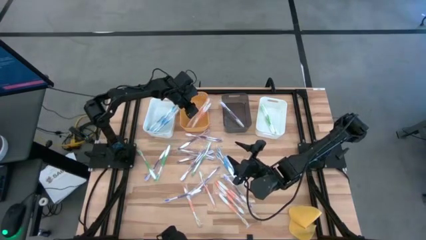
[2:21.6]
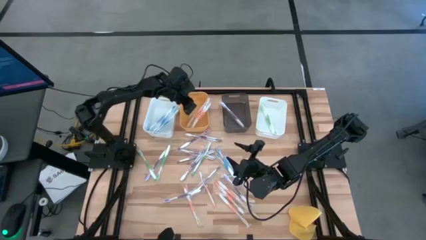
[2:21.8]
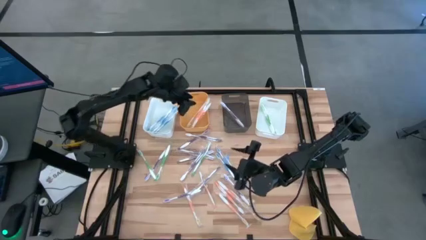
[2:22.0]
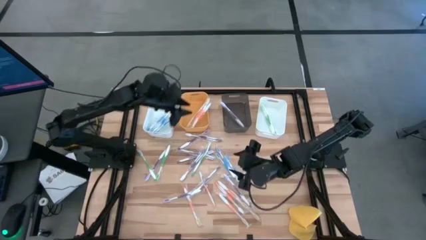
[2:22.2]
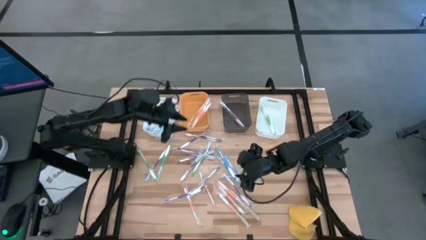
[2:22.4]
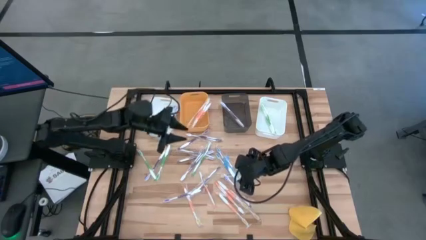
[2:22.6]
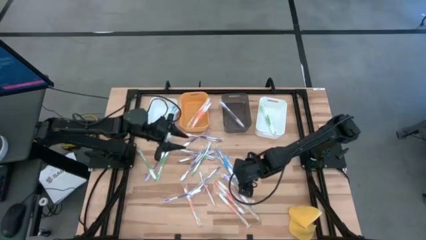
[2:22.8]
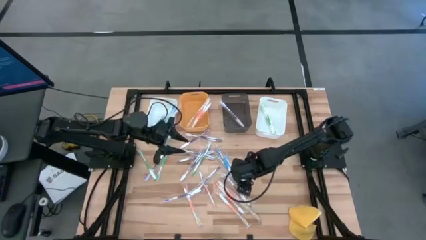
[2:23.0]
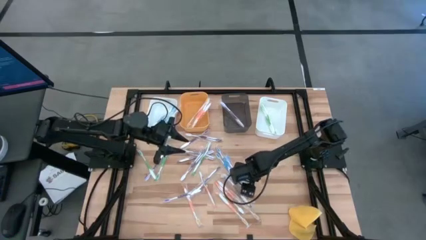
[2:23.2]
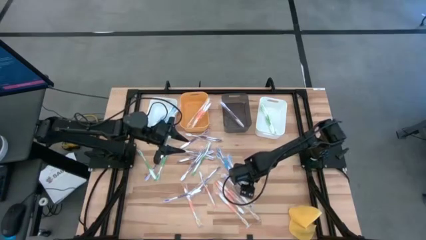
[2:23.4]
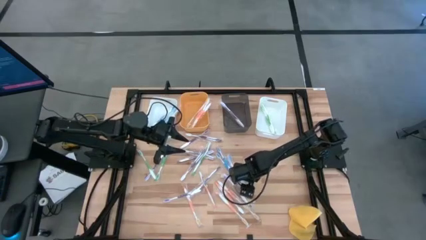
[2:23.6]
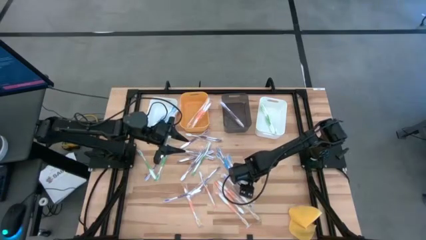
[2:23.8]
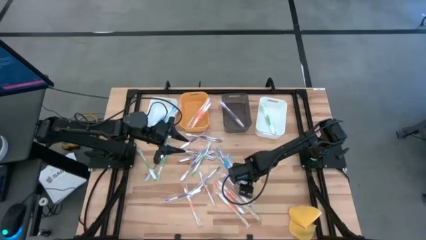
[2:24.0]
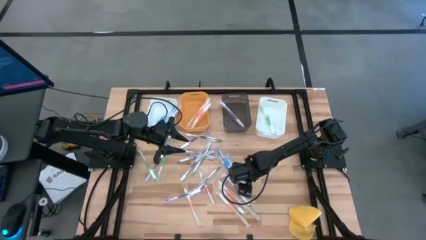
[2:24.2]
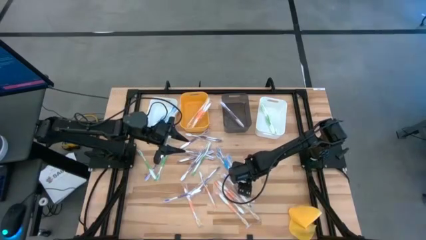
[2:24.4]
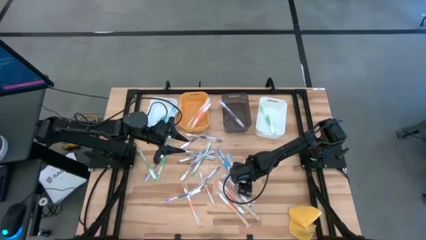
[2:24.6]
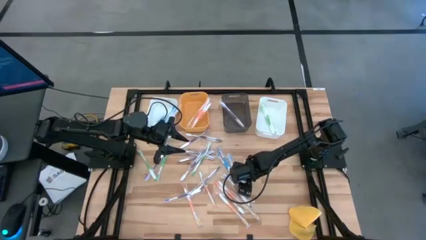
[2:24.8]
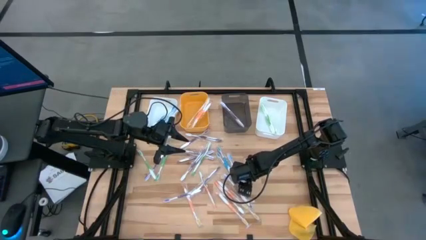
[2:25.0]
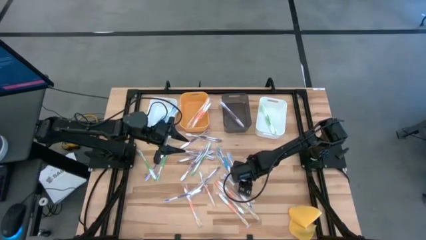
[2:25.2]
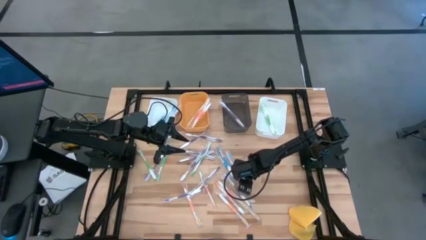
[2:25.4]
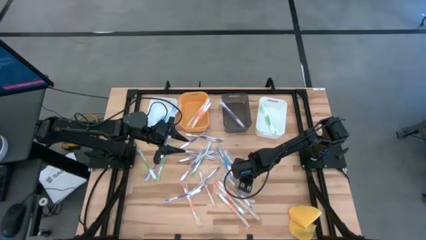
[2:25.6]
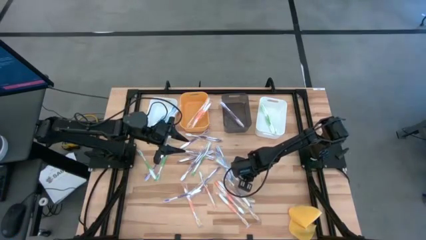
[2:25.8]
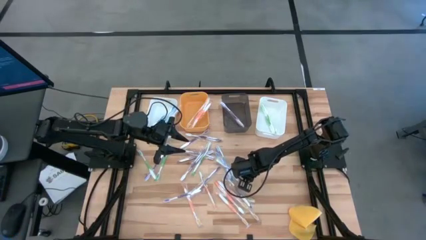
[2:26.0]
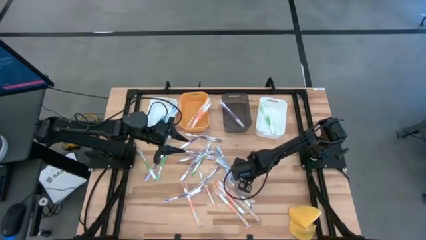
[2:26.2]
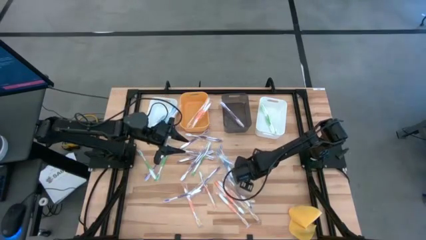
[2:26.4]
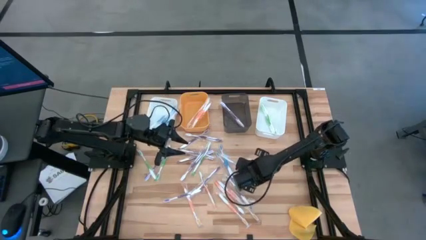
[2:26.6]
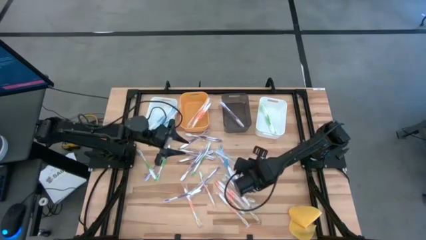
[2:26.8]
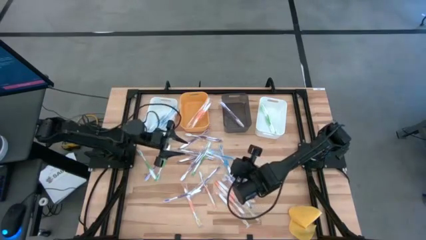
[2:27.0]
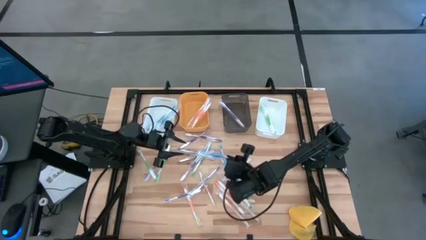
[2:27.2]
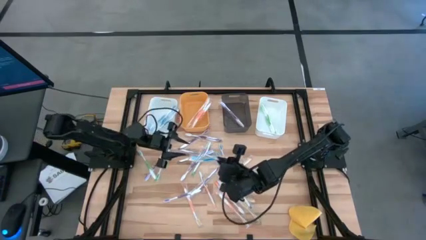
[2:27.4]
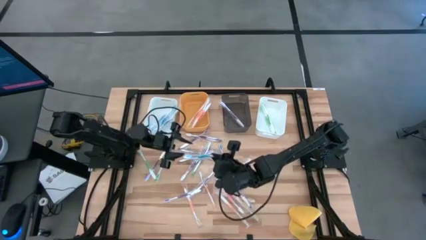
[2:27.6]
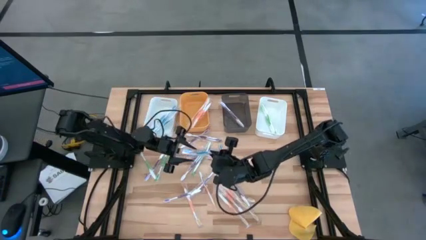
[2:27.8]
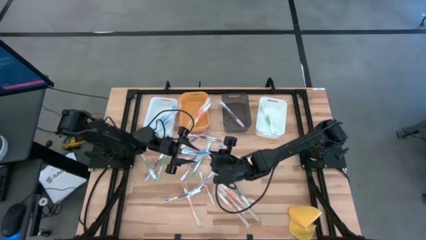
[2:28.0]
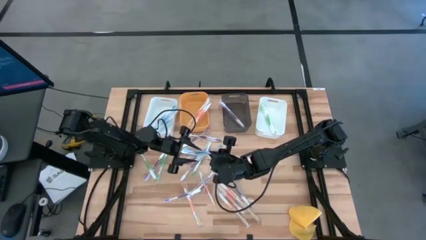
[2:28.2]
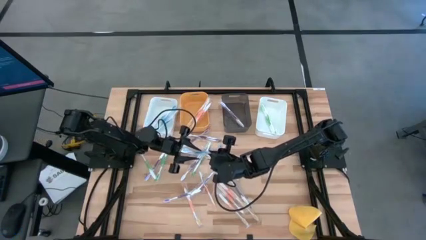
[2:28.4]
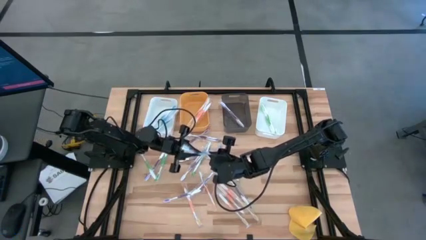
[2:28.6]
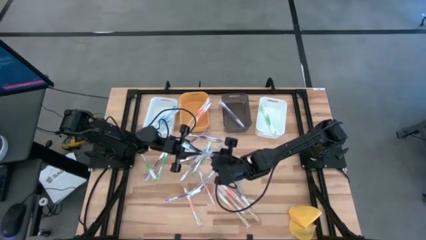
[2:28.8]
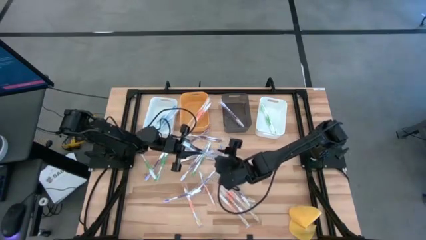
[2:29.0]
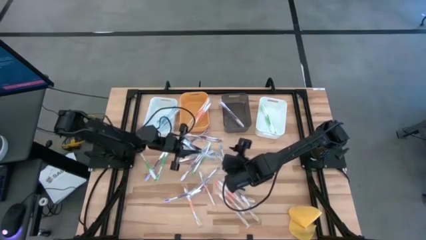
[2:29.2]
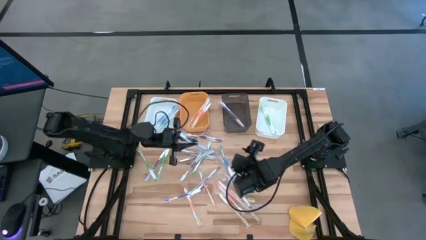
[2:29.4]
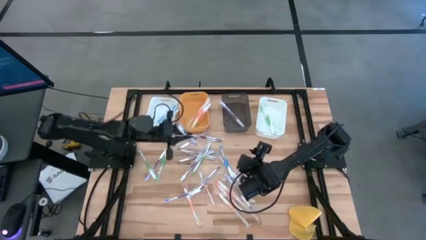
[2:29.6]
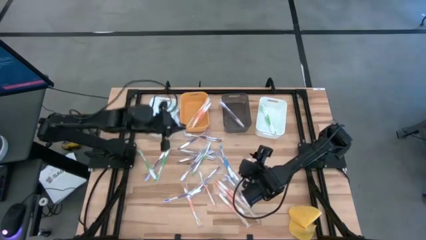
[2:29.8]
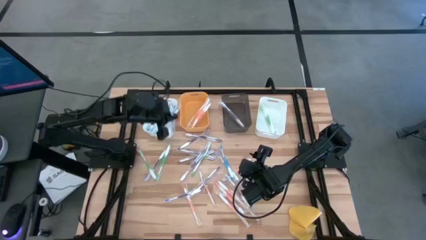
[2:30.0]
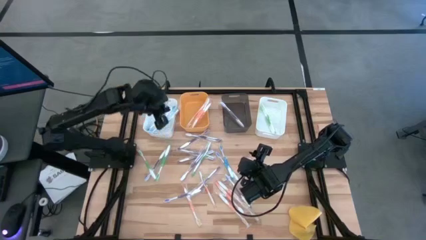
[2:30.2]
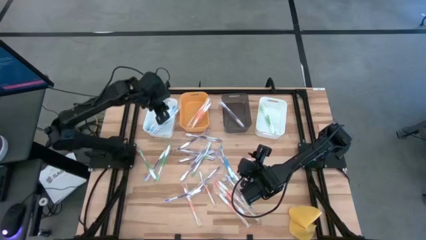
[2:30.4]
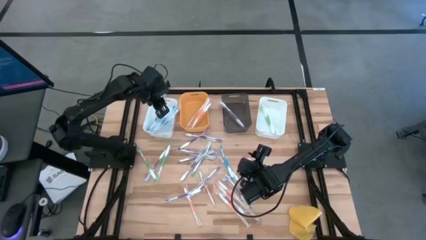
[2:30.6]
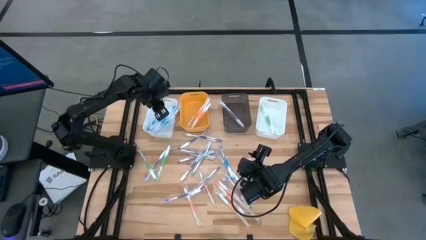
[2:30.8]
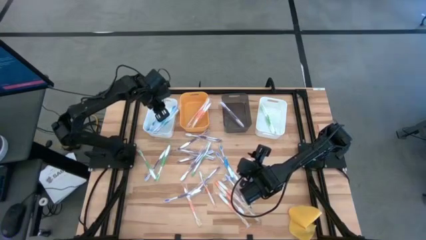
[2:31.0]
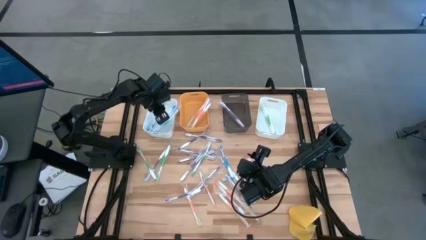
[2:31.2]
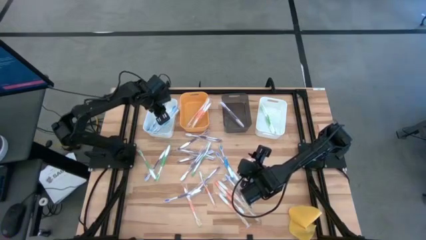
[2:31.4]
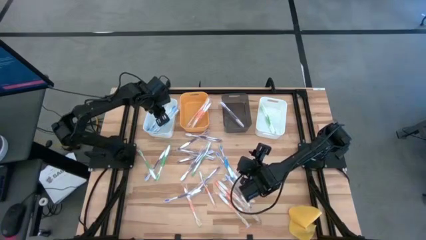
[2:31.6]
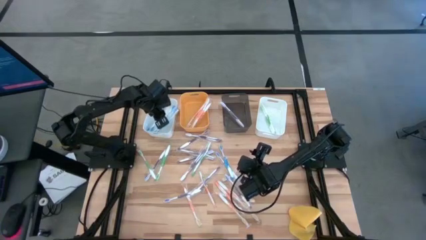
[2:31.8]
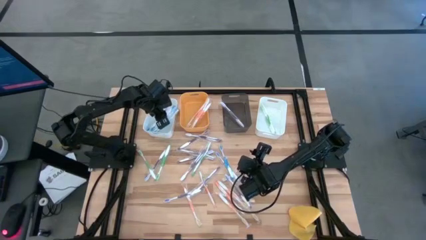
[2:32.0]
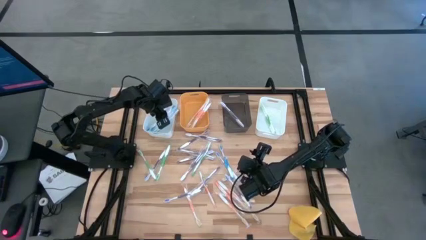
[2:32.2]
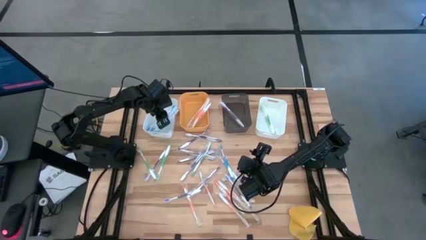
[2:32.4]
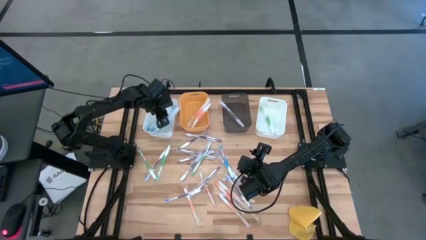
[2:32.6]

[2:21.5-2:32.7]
Task: Pick & Place Toothbrushes
Put the blue toothbrush into the left white bin

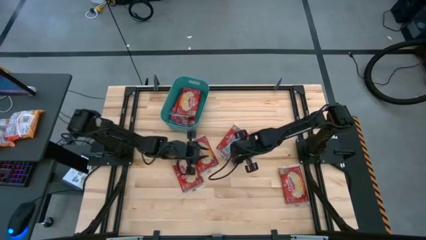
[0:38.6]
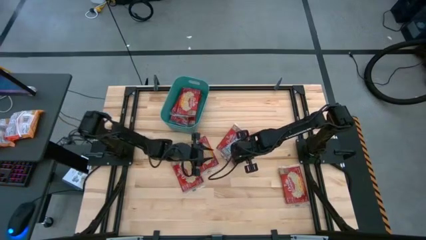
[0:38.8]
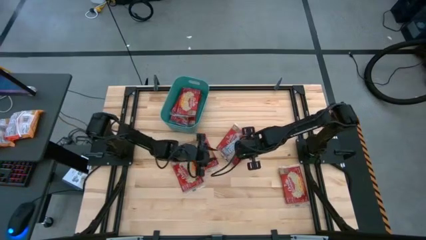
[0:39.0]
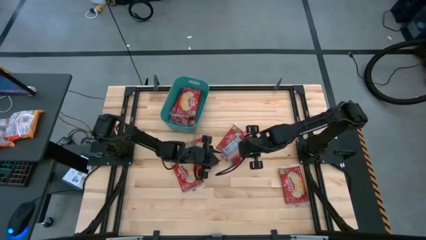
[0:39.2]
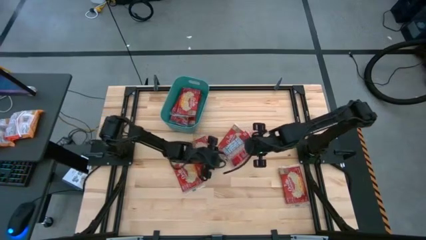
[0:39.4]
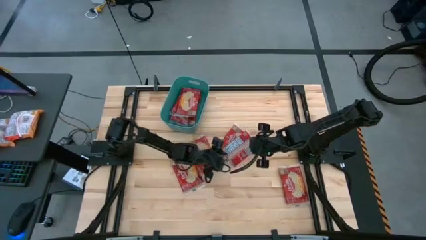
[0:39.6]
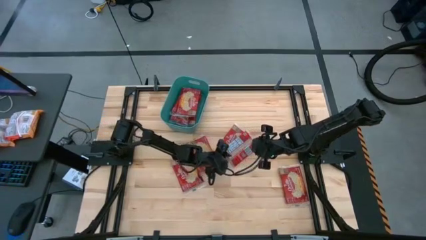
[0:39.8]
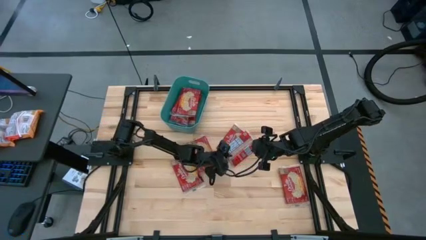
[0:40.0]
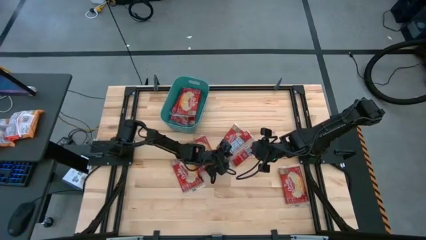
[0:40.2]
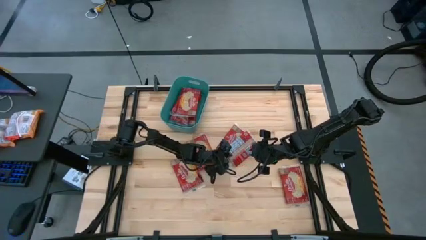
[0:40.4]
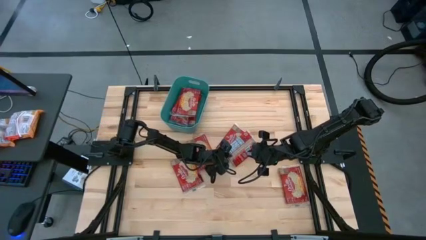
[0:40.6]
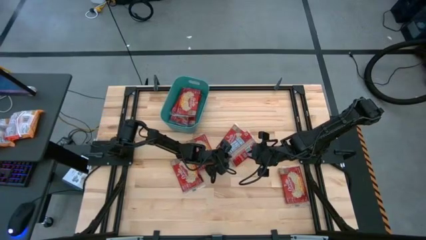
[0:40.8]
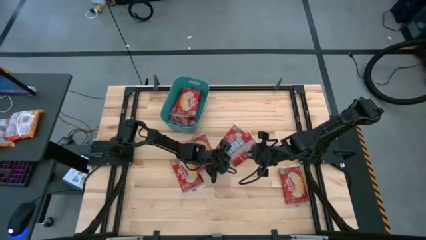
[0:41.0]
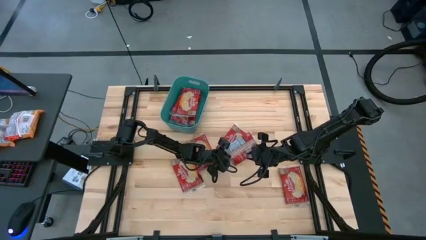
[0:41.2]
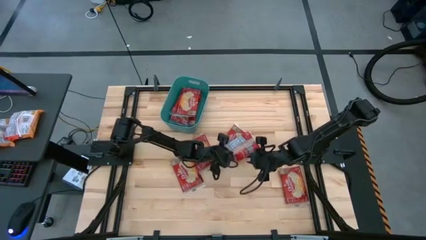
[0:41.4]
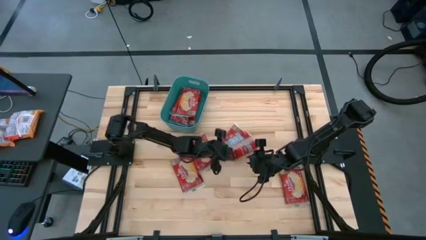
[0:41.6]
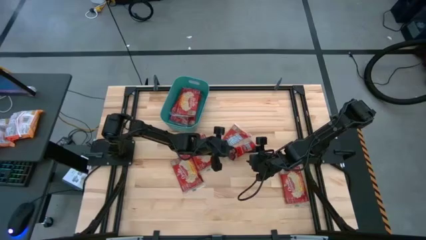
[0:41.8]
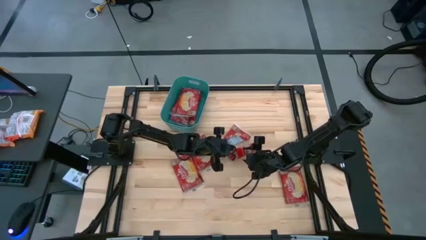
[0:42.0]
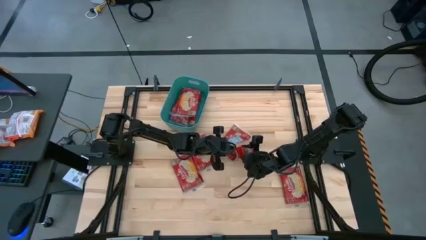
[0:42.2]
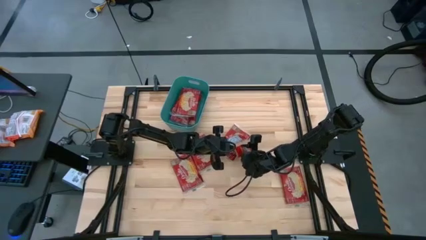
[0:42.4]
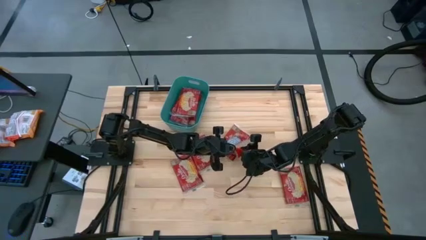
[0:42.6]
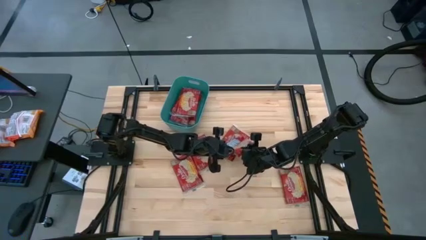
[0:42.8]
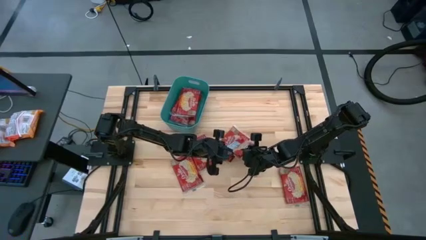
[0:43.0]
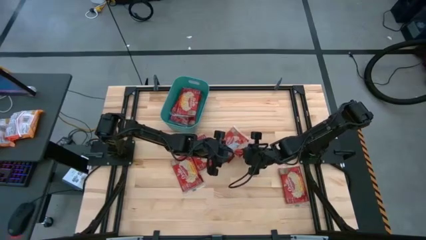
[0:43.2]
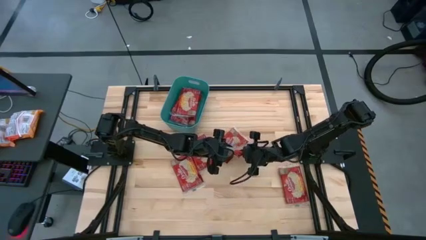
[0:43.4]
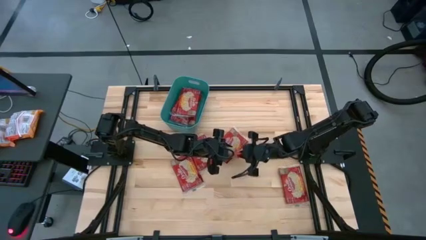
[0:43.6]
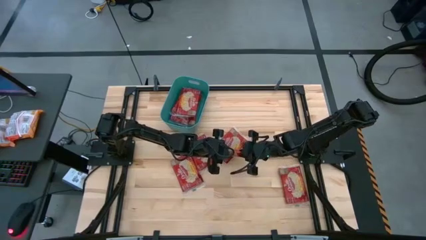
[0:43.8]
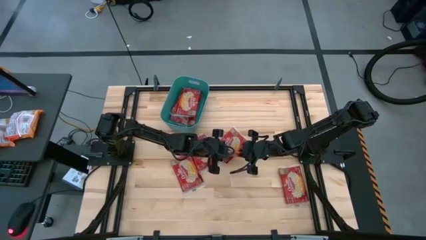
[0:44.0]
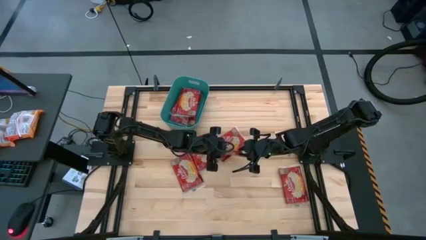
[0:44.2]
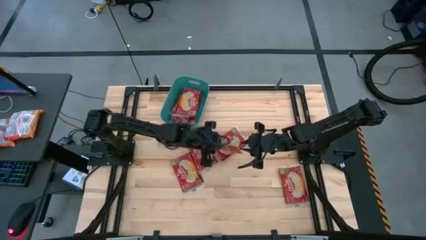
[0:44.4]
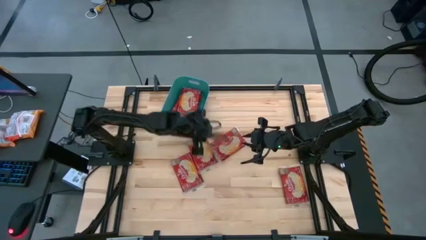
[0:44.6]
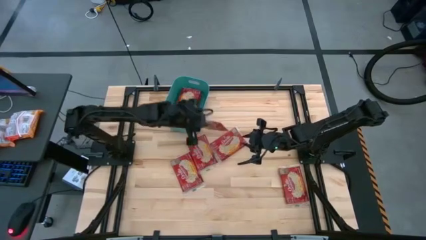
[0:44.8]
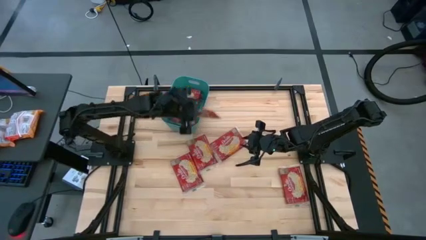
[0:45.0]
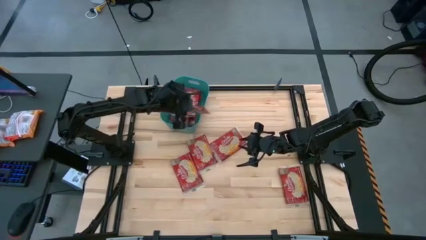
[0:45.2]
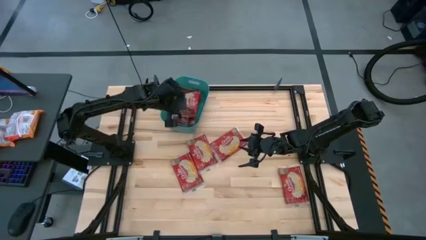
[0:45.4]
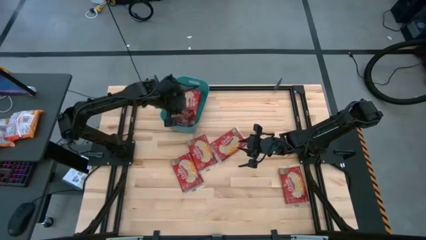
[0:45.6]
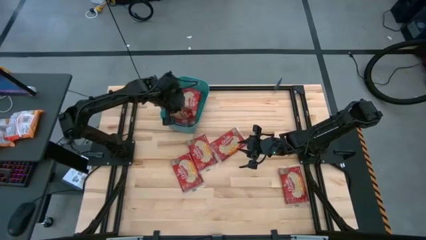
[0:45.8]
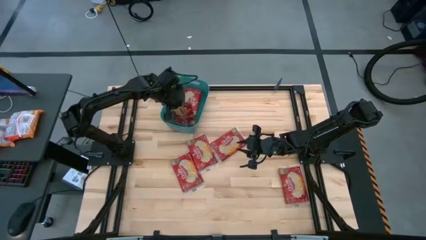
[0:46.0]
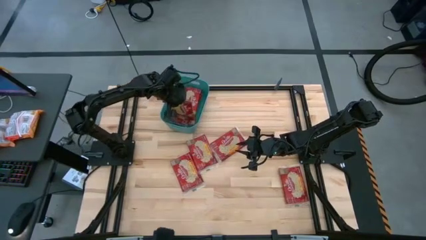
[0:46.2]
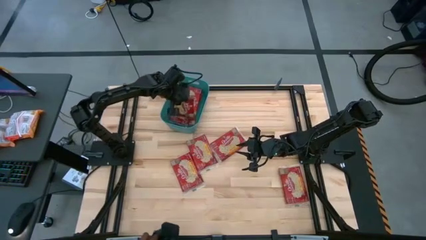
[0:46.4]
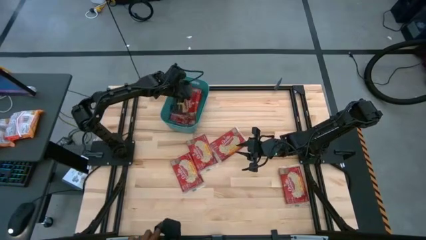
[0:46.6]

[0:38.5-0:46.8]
Task: Sort popcorn bags into baskets
Put the red popcorn bag into the green bin
